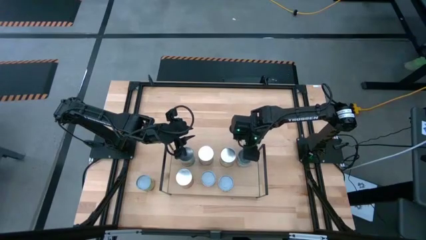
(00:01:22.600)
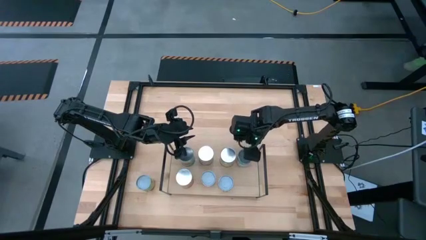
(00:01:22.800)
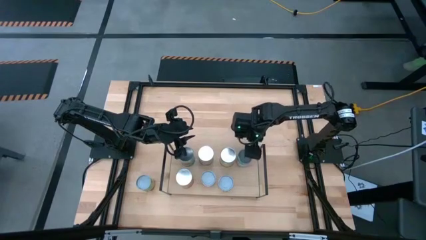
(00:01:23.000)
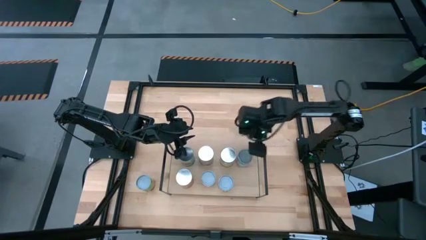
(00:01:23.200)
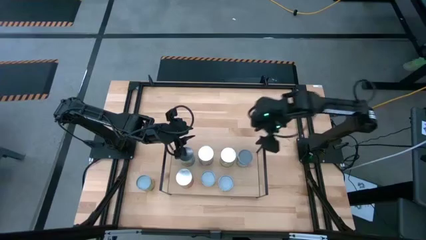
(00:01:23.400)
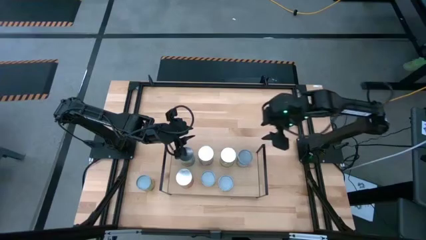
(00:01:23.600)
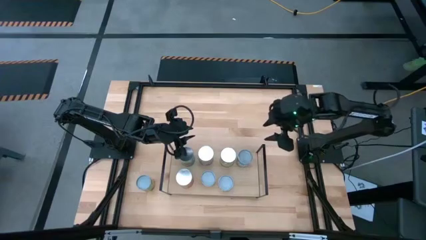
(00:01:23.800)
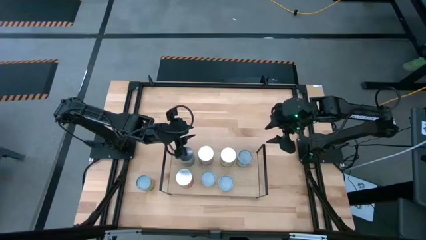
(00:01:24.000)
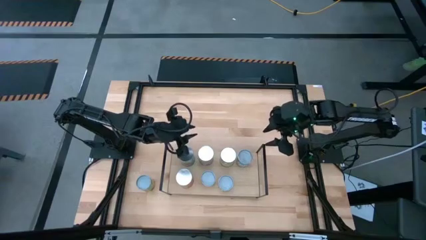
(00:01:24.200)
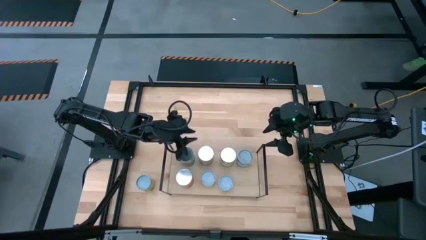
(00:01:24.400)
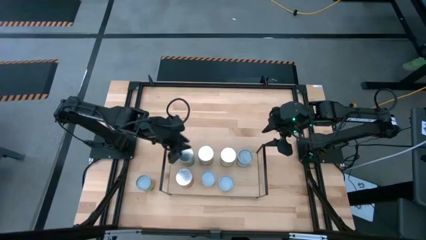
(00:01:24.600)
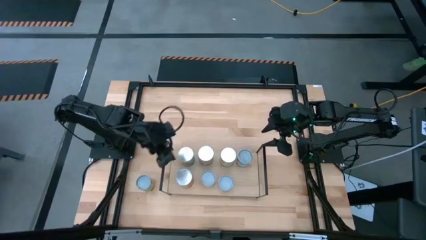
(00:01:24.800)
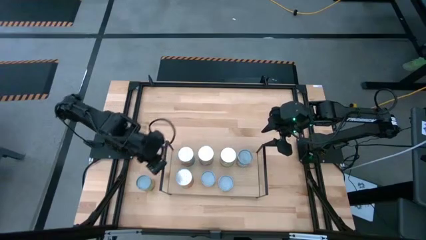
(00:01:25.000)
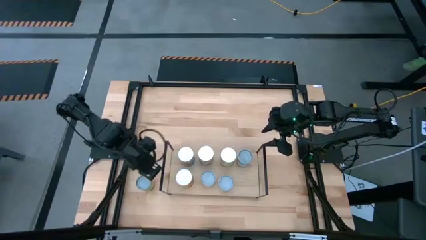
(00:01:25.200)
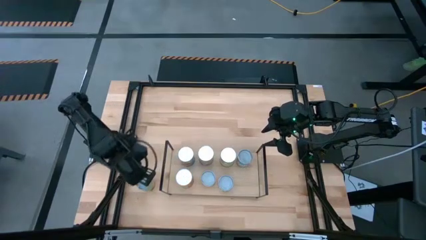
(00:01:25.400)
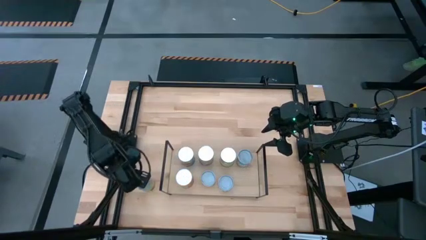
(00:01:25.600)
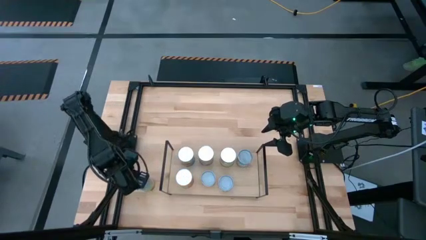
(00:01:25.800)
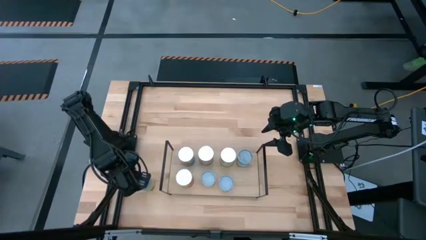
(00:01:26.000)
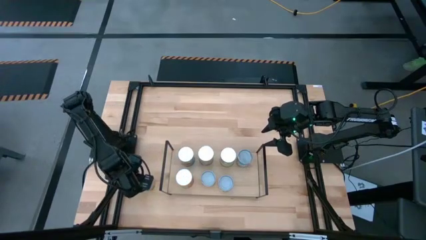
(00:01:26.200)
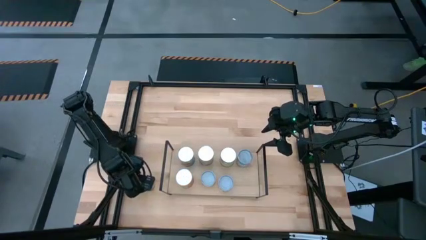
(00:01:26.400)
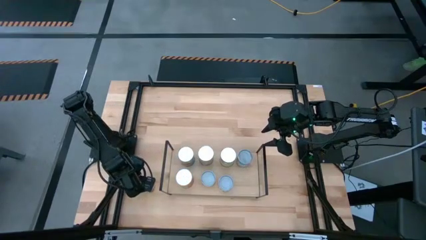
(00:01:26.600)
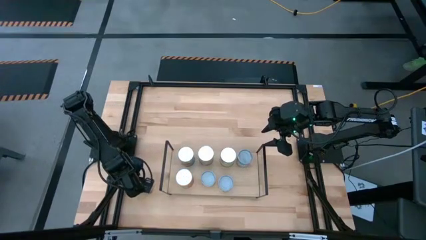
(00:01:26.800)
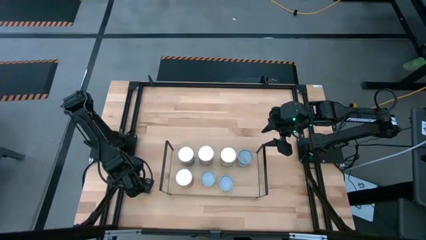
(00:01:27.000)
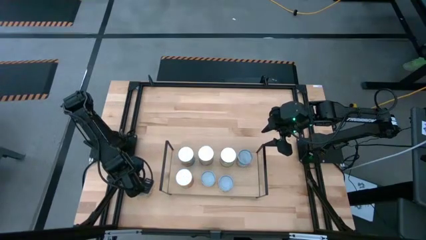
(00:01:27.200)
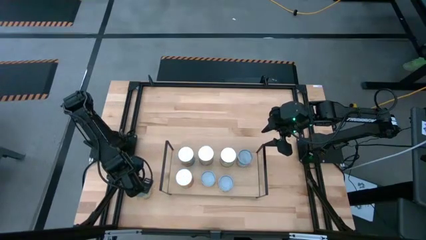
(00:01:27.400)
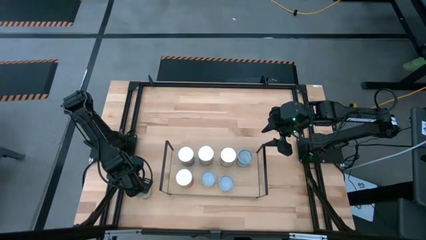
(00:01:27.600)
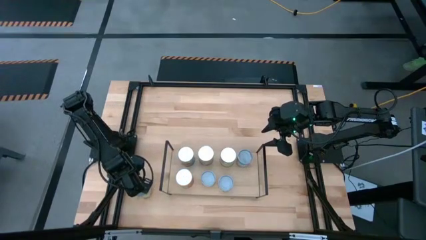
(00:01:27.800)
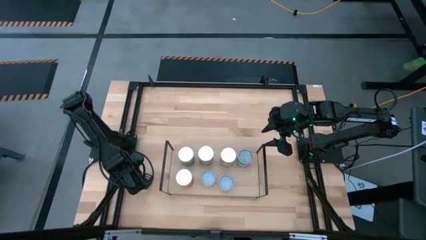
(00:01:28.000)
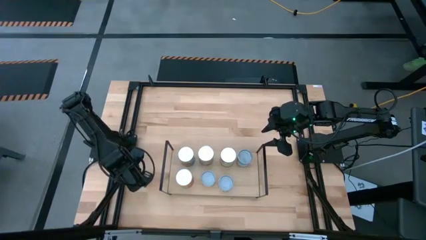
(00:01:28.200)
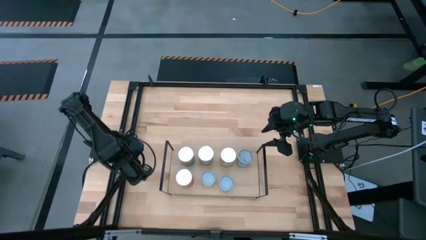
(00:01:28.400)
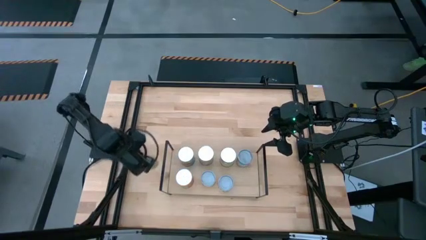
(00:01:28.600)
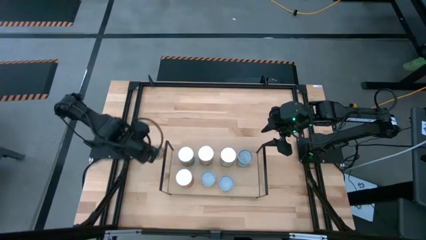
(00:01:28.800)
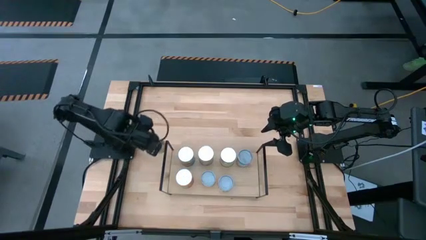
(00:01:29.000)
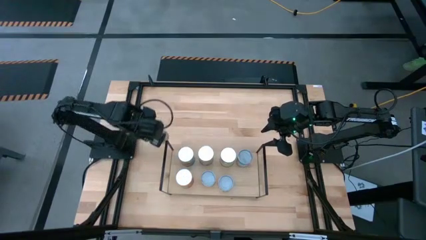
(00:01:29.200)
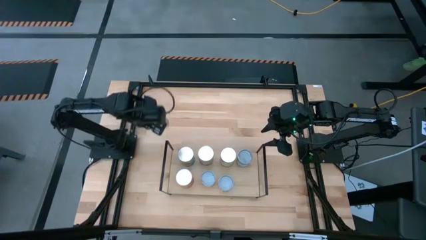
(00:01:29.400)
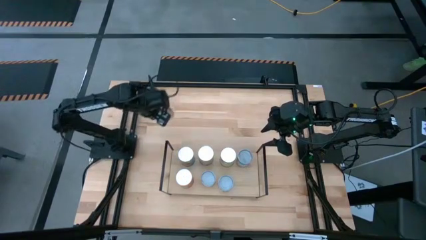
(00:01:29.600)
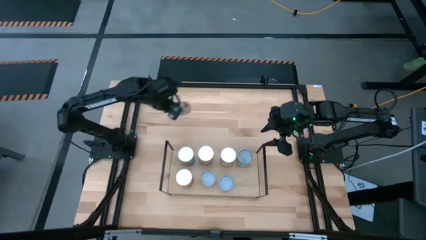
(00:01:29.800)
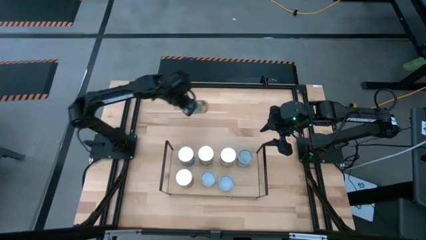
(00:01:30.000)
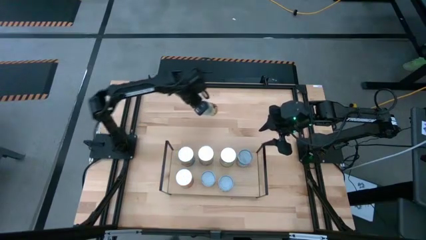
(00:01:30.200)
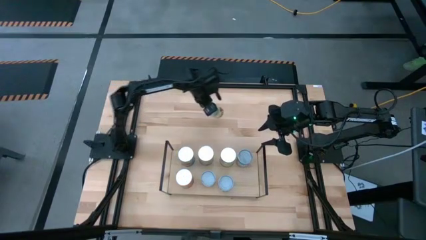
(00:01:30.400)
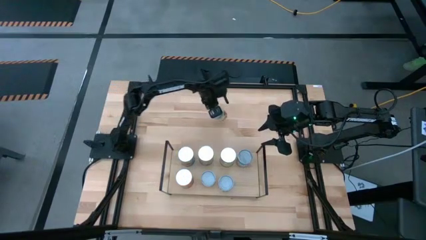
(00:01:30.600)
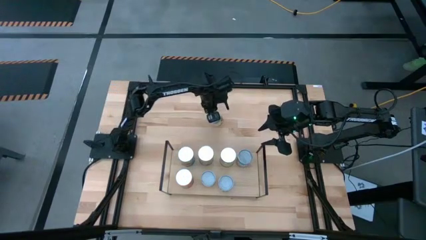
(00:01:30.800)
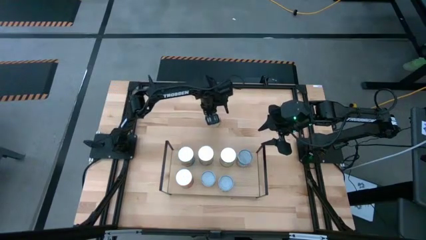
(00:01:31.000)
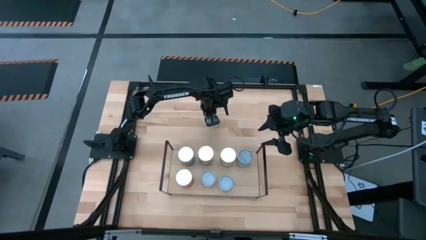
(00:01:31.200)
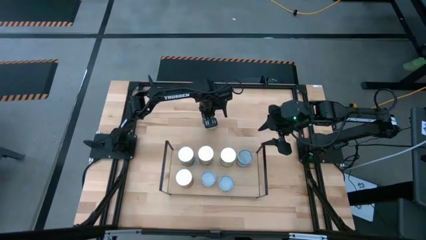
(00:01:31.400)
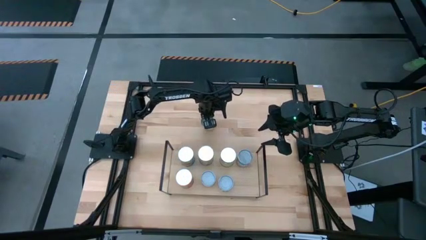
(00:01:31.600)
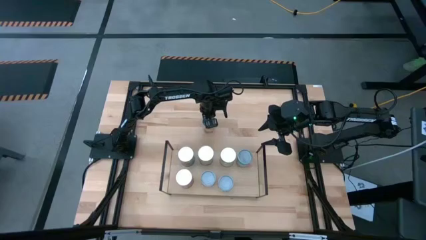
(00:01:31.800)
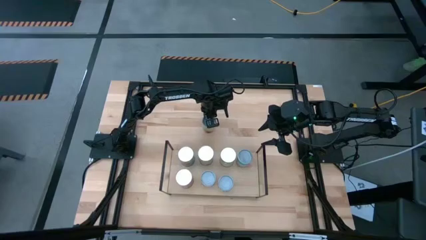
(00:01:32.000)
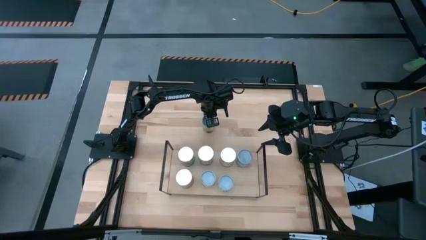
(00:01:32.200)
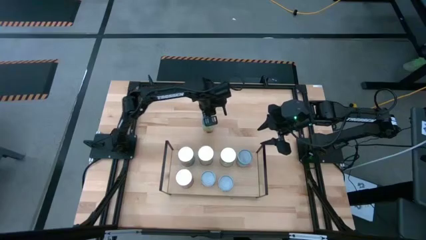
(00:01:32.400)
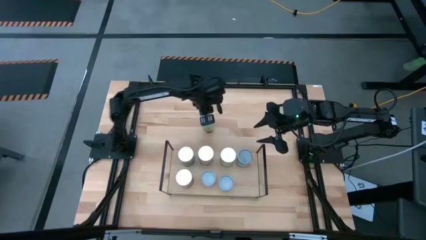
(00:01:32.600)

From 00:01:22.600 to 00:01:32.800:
Task: Pick and place cans onto a shelf
Put the green yellow canned spaghetti sauce on the shelf

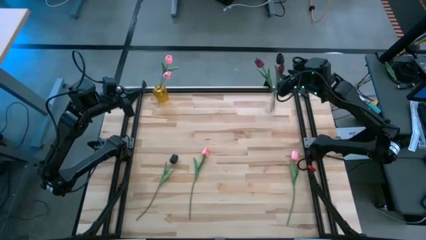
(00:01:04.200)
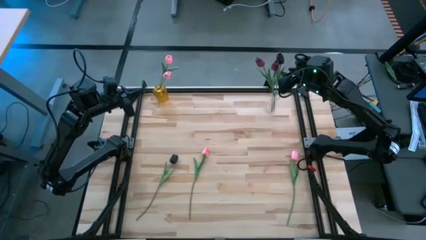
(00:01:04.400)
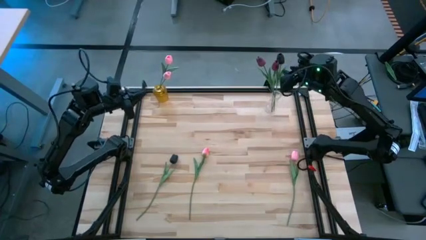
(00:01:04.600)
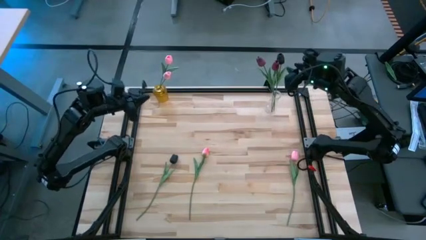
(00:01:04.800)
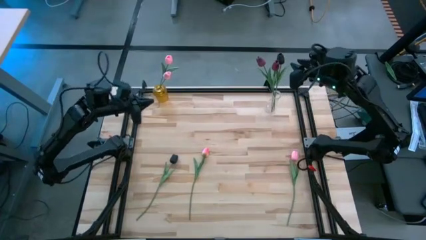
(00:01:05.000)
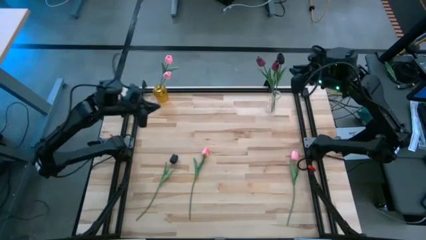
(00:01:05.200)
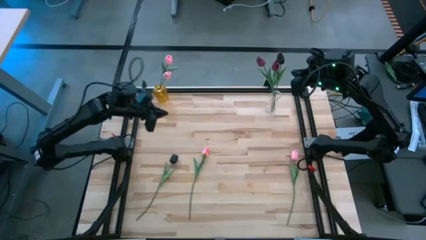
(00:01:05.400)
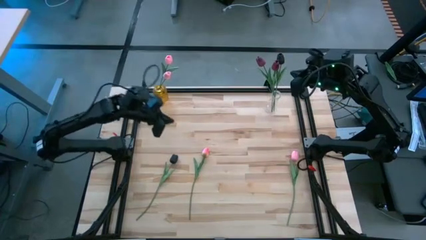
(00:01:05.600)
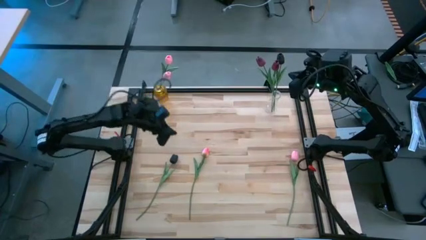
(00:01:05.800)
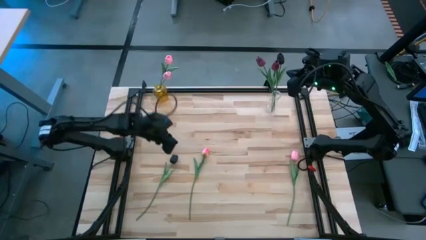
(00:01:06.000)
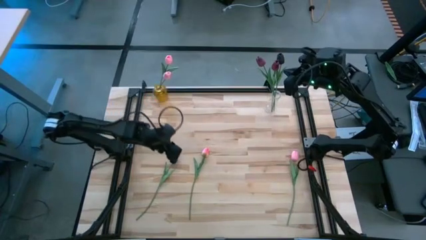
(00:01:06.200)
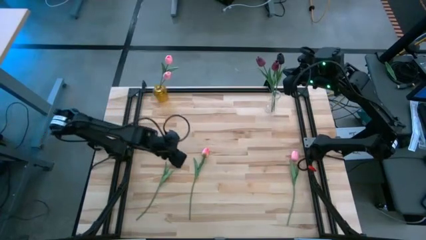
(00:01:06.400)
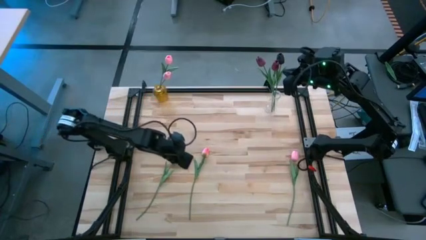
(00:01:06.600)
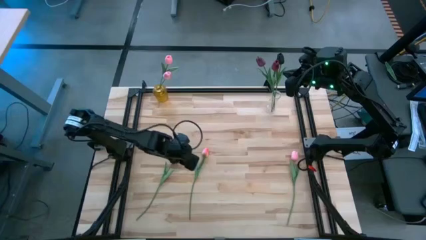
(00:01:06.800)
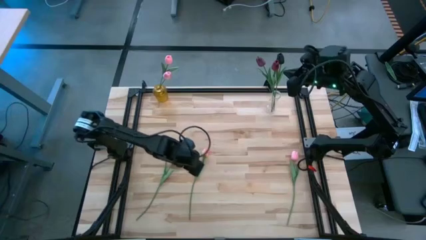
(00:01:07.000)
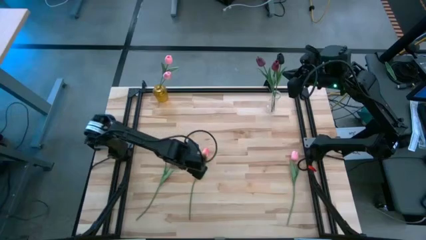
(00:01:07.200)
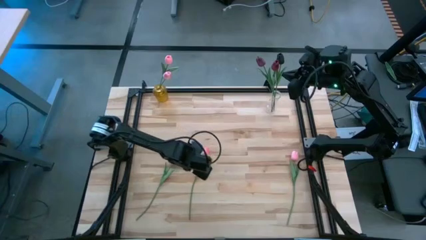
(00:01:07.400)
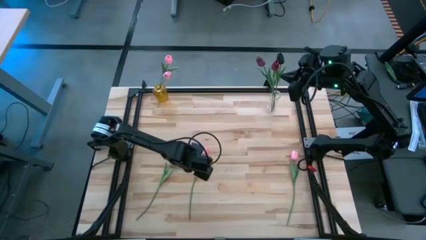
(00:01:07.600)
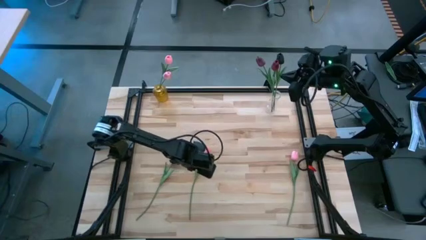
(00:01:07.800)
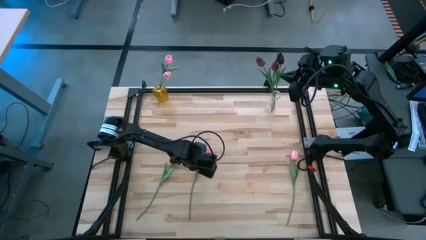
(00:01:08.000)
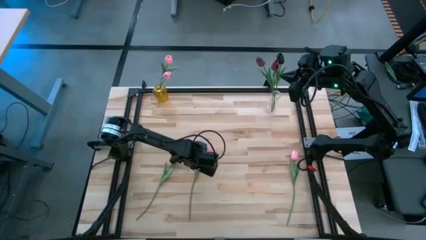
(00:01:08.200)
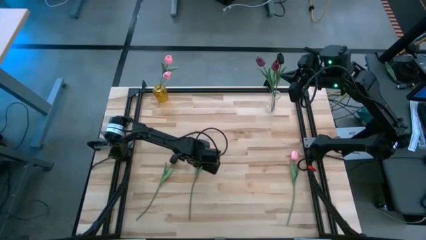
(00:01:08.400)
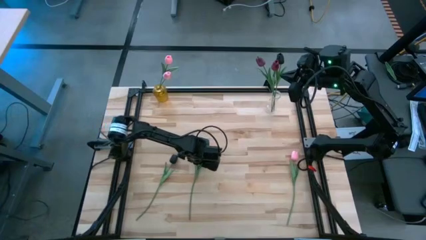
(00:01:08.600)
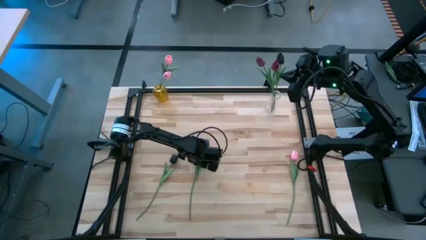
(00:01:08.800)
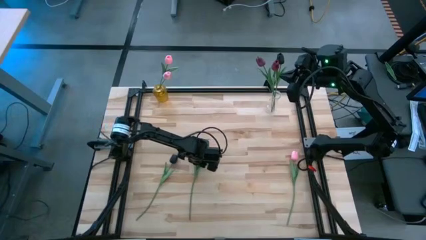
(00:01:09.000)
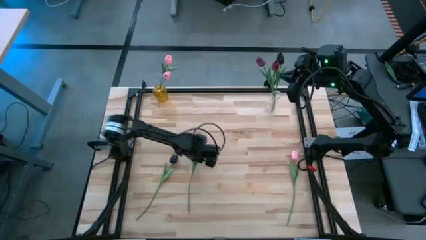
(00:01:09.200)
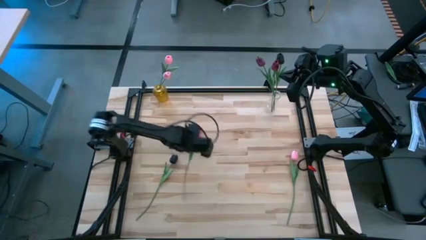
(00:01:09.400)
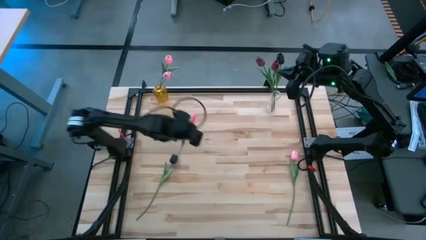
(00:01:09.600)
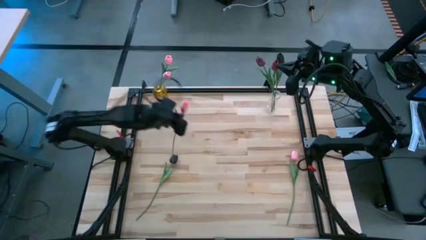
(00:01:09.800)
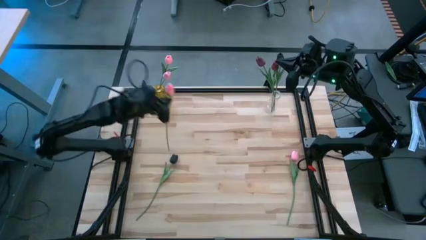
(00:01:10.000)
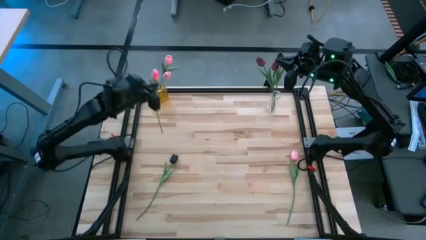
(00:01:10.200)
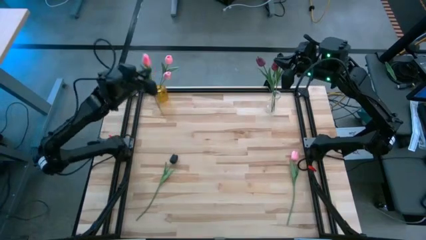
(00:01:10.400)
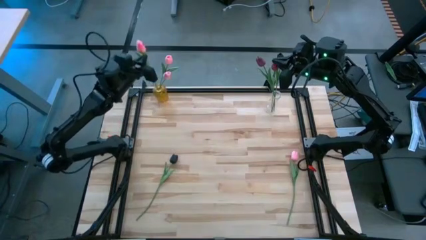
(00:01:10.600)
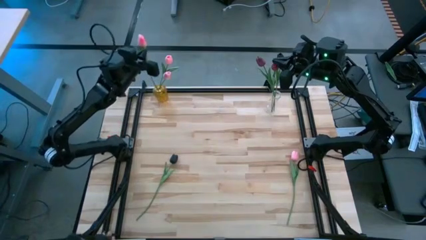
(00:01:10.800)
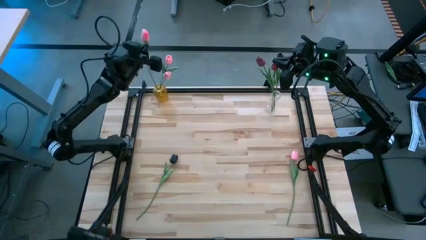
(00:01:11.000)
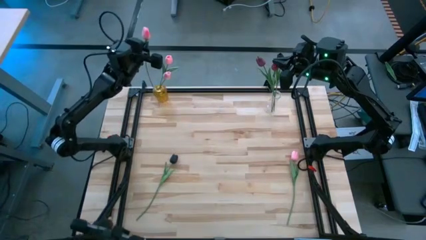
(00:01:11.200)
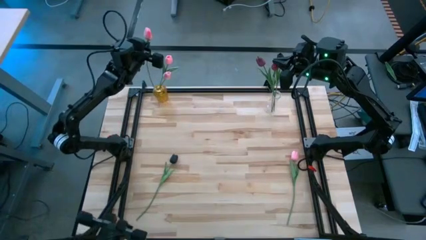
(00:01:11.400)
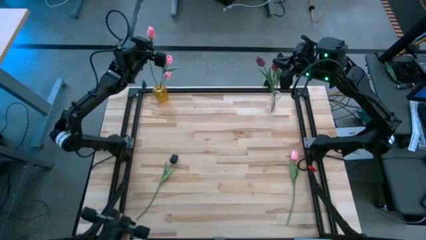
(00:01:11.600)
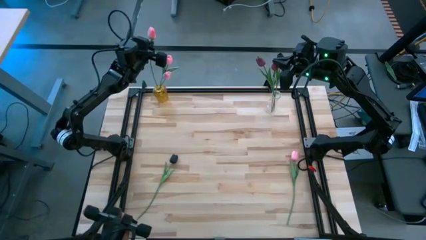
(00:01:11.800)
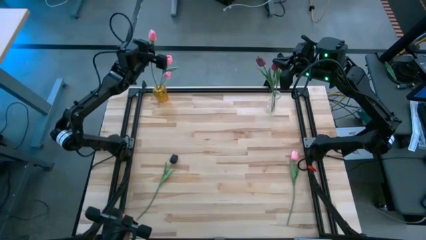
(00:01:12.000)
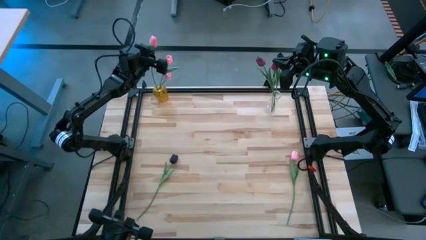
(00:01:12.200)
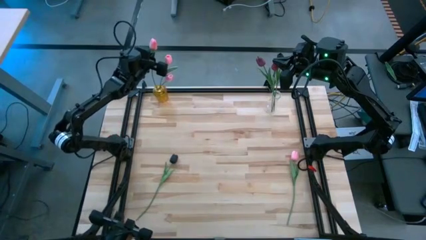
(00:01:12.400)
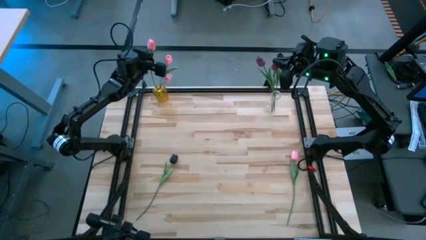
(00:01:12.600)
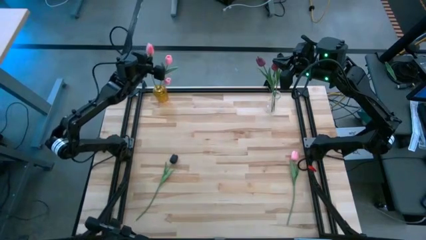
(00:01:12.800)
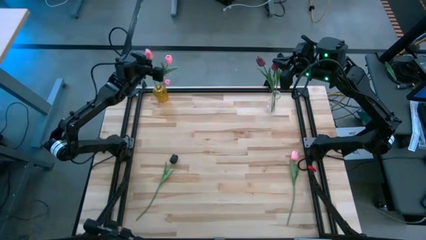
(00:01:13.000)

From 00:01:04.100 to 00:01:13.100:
Task: Sort flowers into vase by color
Insert the left pink tulip into the yellow glass vase
